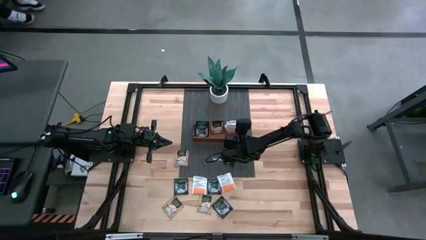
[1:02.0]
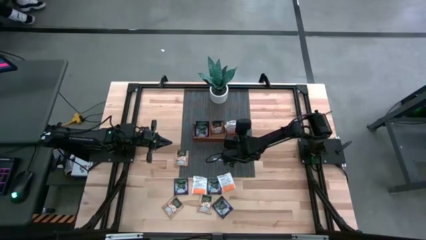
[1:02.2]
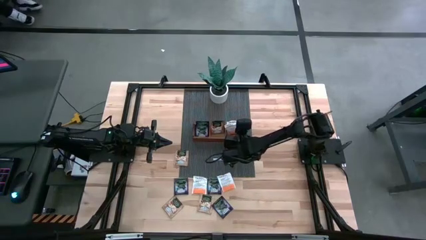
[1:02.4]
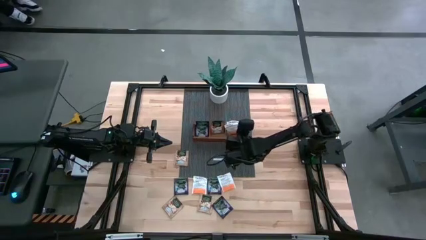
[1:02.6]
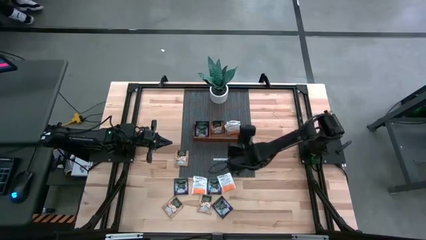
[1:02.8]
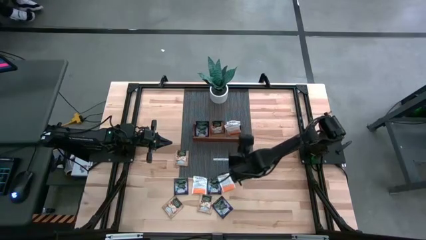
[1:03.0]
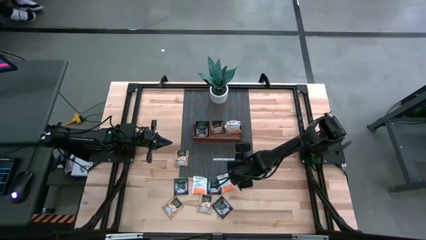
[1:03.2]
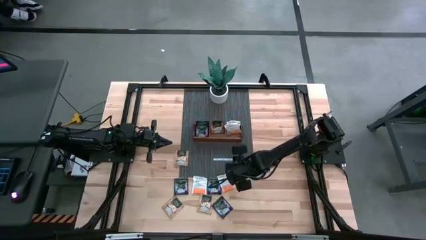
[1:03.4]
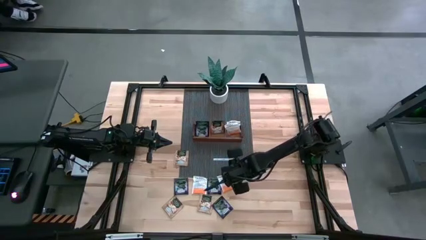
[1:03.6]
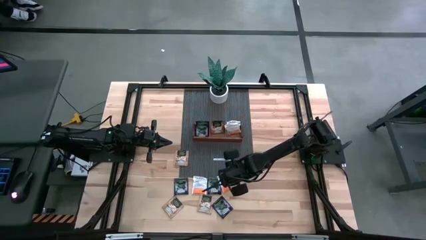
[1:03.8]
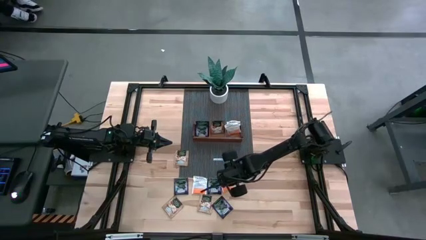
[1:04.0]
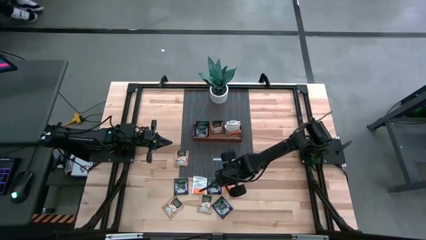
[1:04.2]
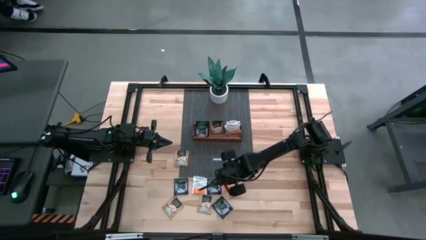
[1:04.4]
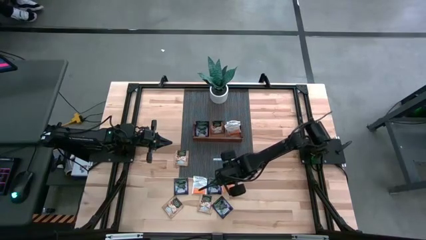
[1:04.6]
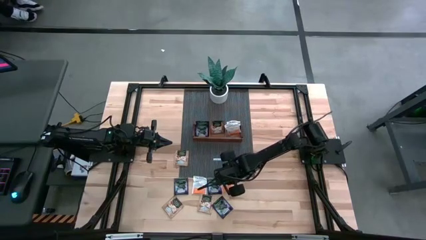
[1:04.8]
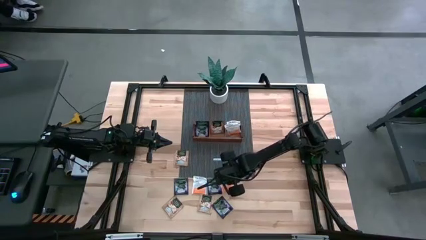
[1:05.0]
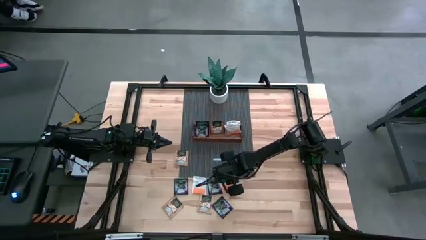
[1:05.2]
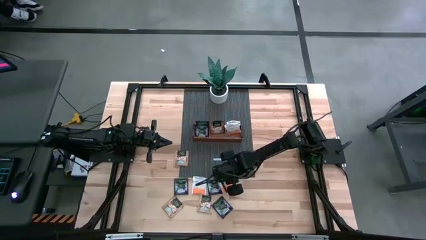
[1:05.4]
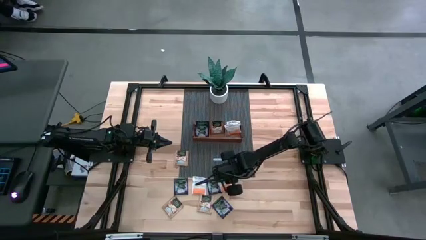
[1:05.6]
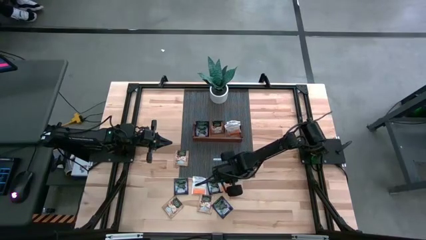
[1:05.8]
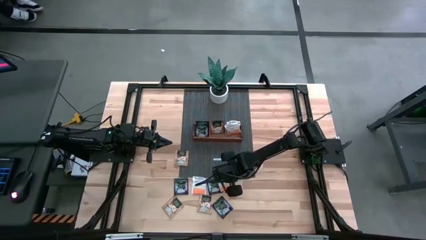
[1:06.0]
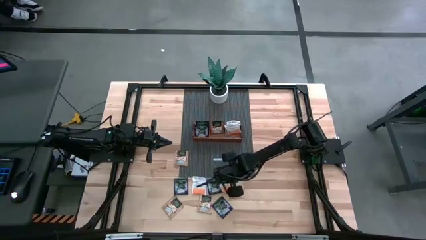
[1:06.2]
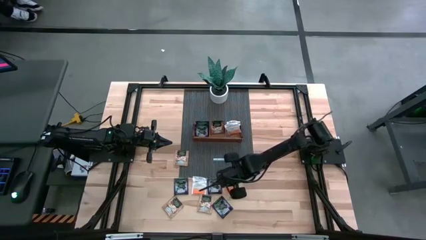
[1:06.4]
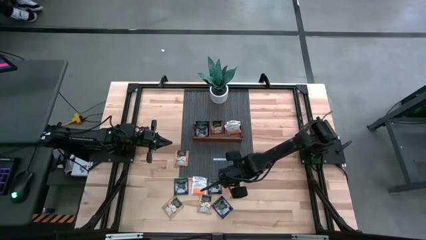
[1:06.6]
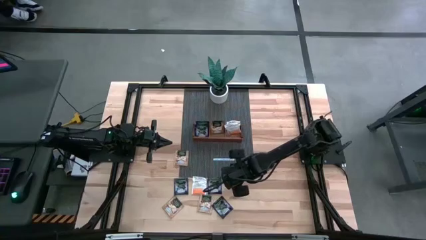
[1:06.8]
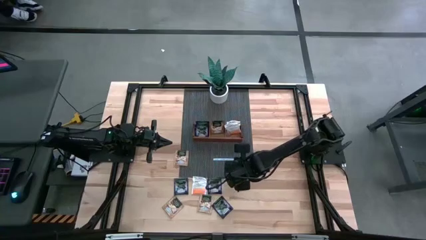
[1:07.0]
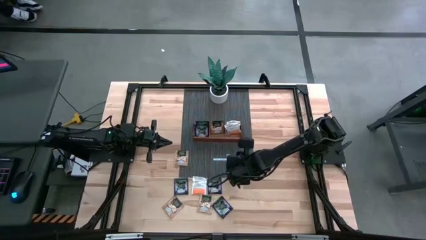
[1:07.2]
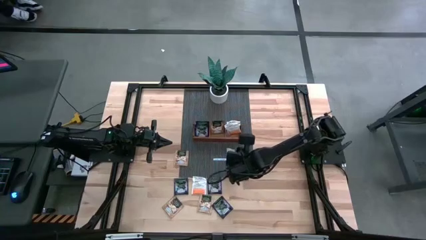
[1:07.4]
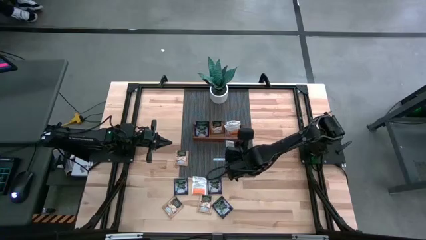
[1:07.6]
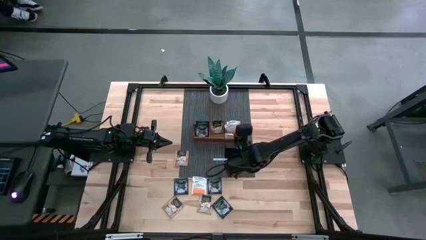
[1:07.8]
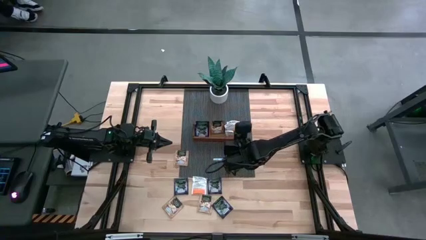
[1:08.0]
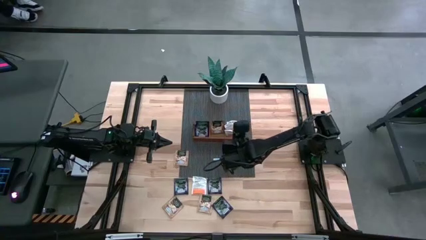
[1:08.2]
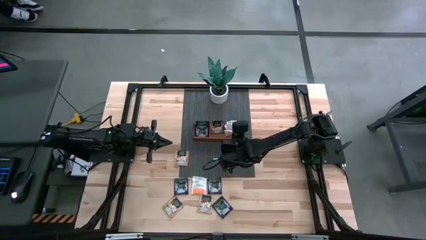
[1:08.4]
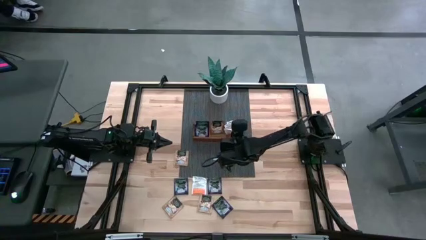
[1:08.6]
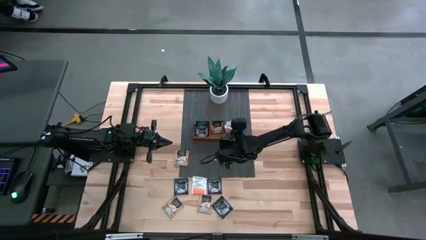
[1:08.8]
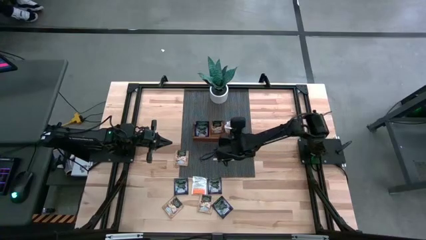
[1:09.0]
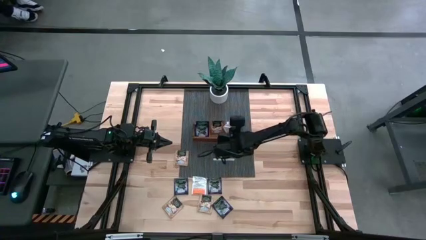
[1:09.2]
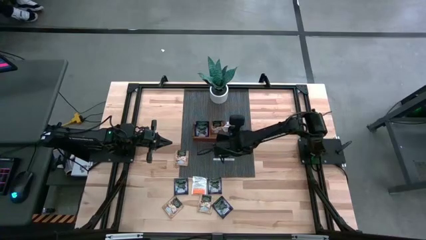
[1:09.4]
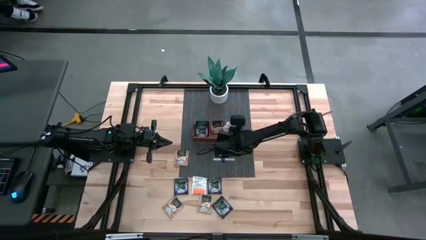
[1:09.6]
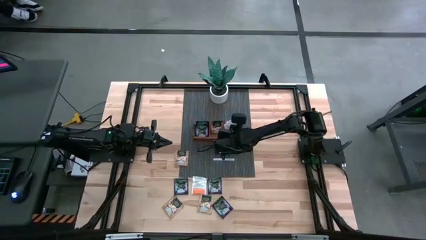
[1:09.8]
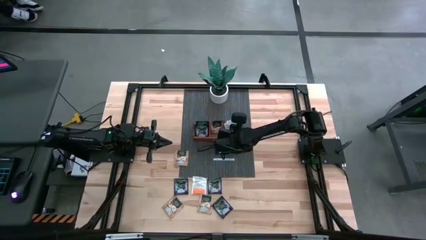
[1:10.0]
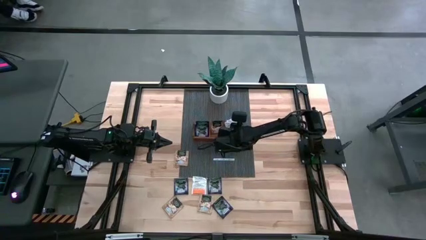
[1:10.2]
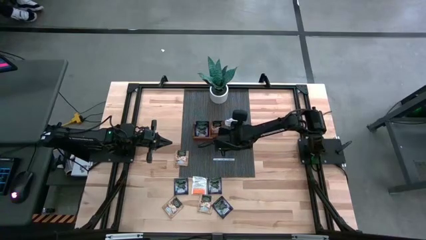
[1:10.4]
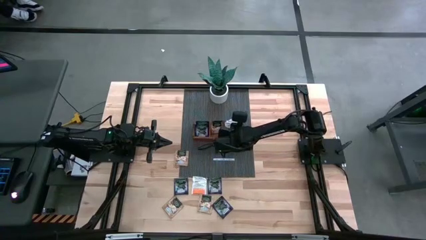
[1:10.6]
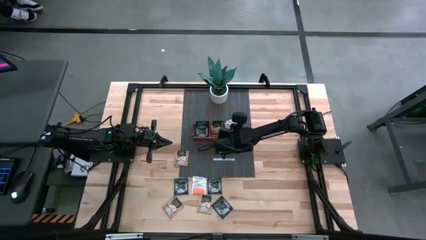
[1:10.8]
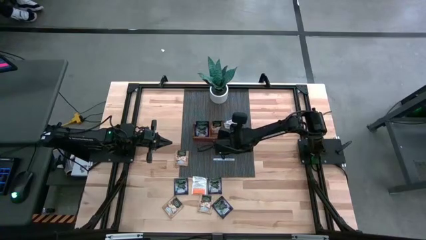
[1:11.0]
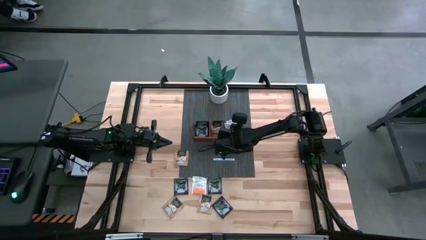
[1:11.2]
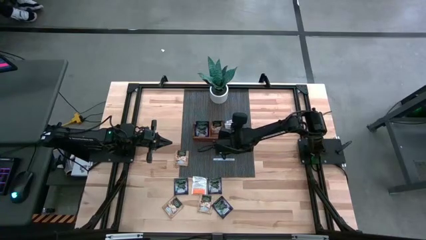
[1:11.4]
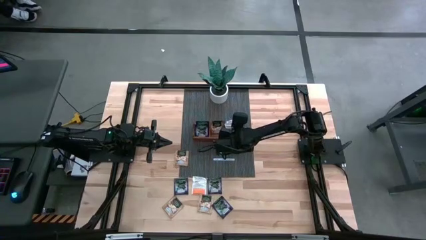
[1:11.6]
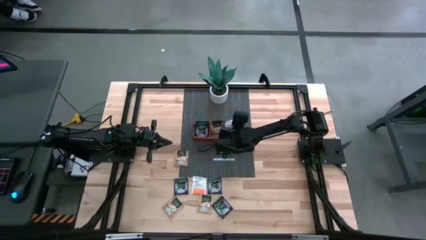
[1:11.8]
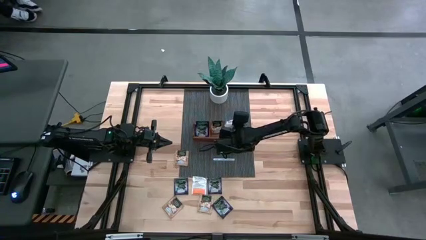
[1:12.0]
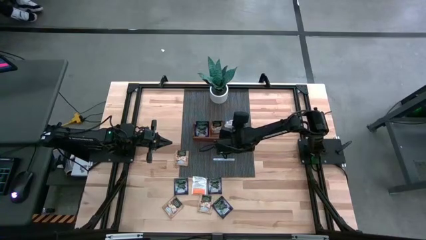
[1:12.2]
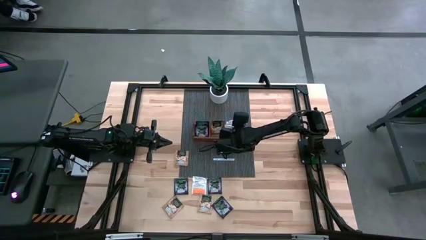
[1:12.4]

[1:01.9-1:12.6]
Task: Pick & Place Tea
Put the white tea bag into the right section of the wooden organizer

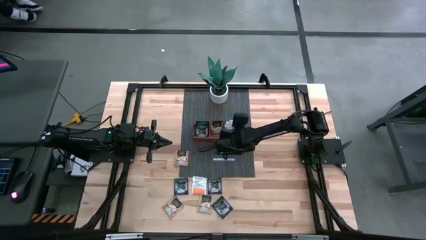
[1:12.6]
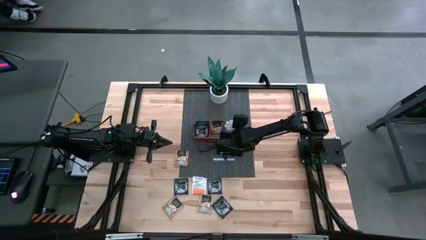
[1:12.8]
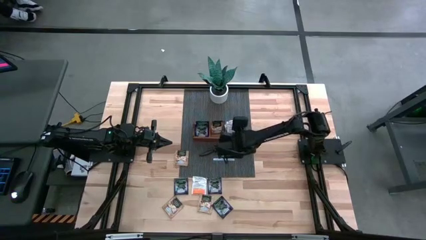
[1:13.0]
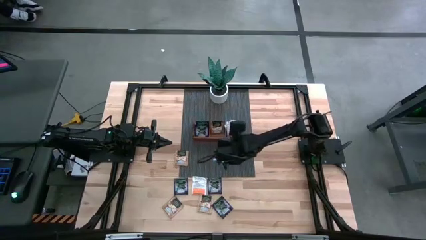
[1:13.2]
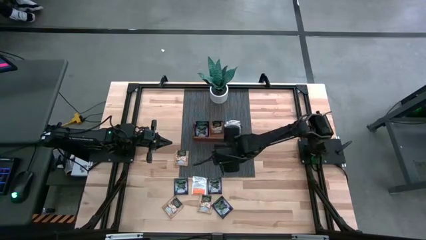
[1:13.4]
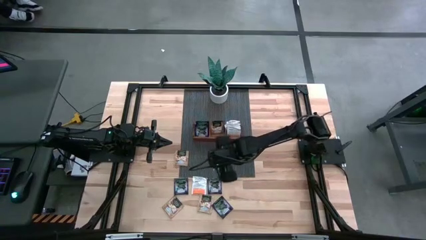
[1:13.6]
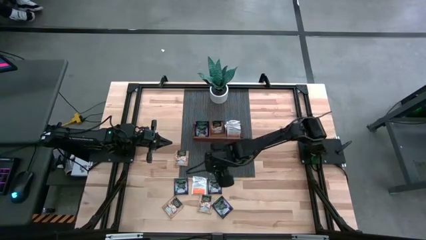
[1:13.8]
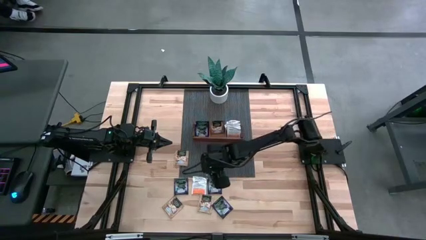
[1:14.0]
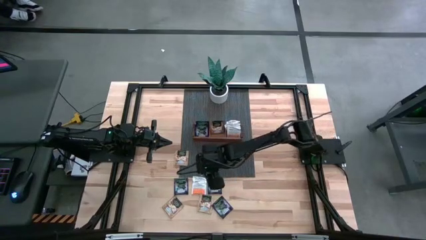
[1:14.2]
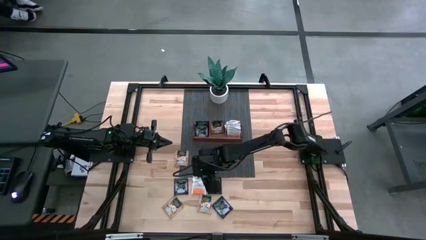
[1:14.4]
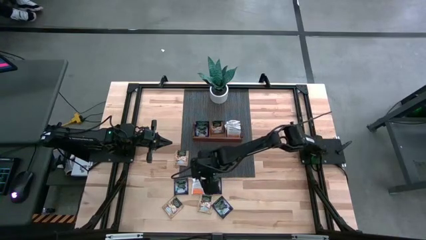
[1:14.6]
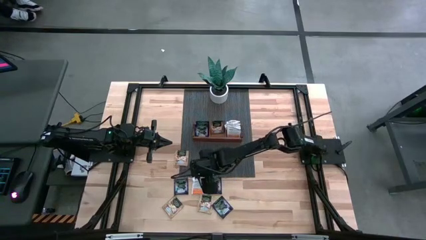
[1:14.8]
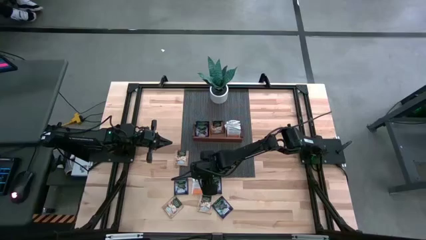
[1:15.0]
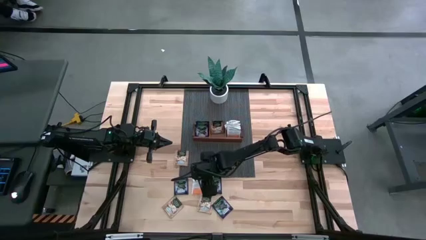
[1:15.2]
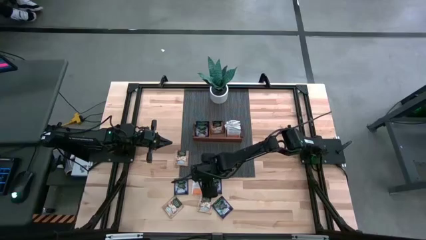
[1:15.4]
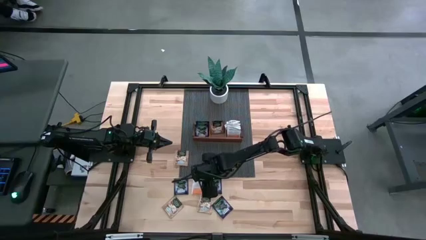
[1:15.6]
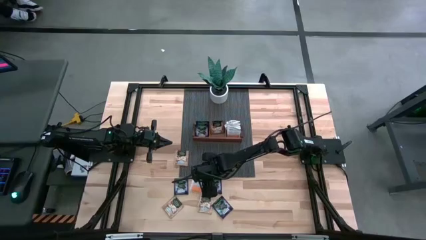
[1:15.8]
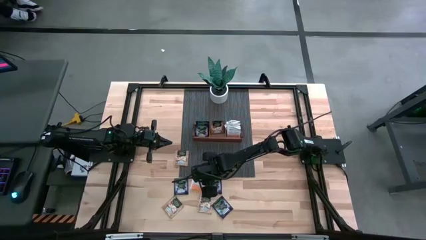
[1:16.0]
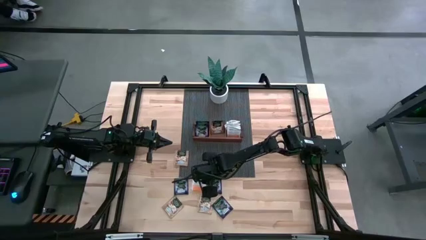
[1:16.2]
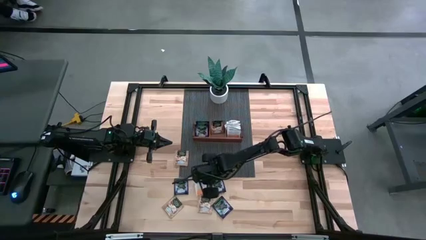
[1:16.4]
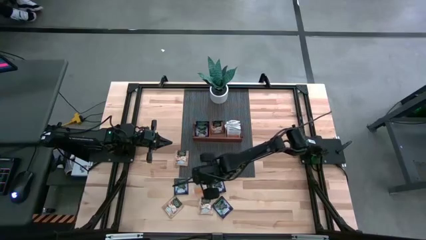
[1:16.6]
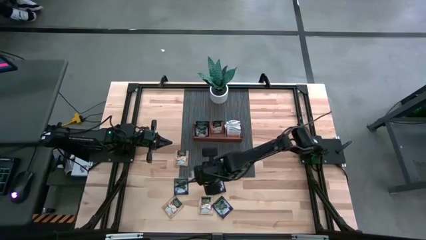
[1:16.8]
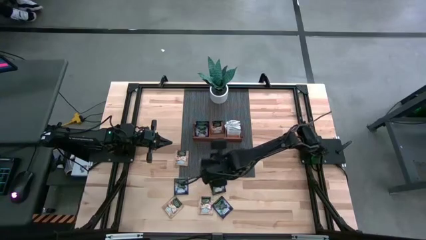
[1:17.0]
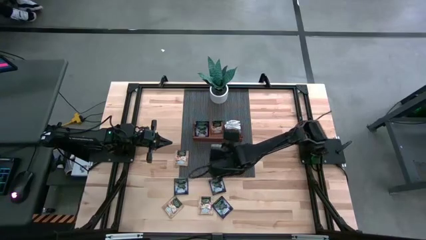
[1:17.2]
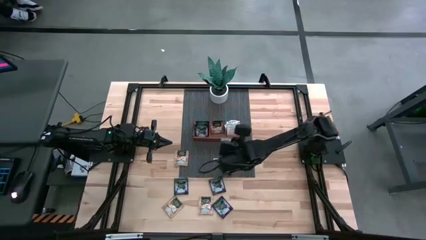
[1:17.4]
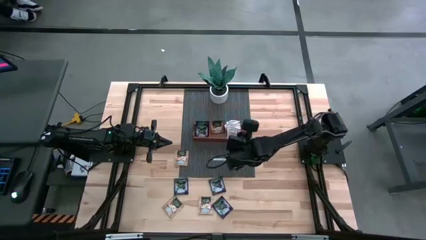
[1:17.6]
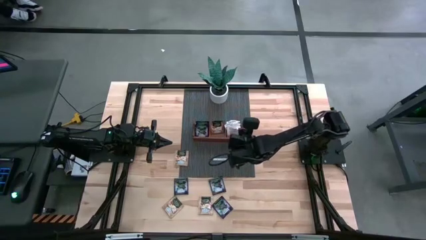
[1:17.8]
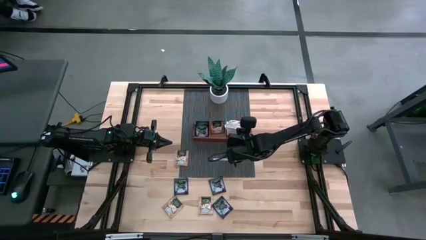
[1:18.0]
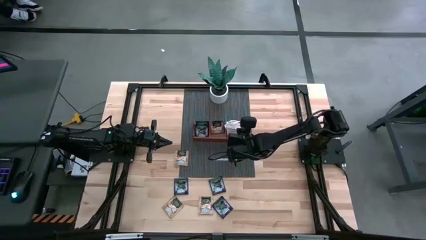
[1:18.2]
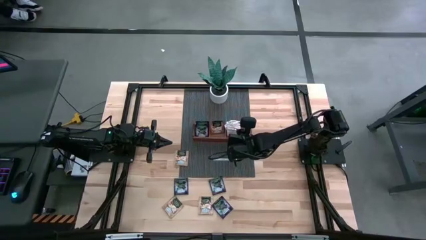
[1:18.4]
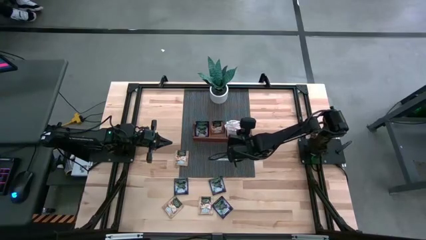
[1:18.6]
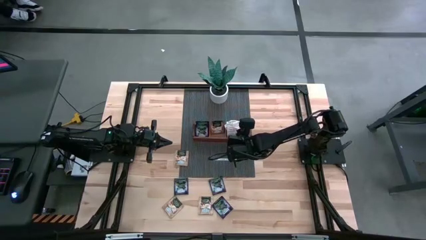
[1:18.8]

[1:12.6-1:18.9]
Put the white tea bag into the right section of the wooden organizer
